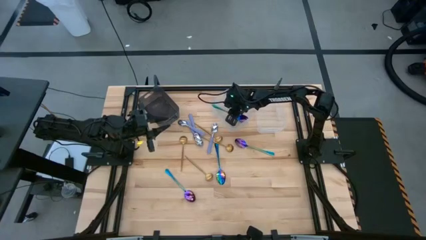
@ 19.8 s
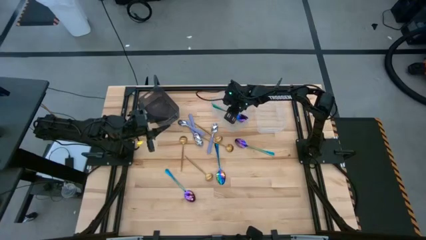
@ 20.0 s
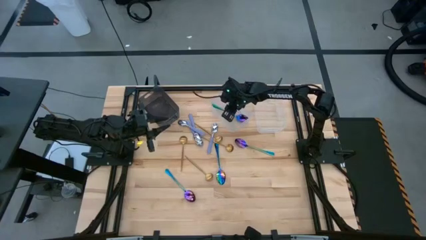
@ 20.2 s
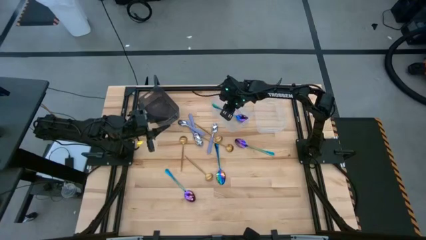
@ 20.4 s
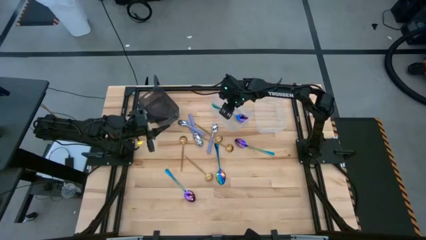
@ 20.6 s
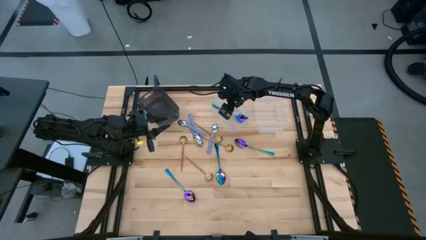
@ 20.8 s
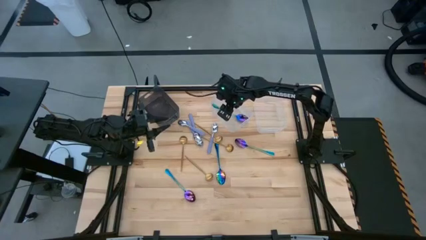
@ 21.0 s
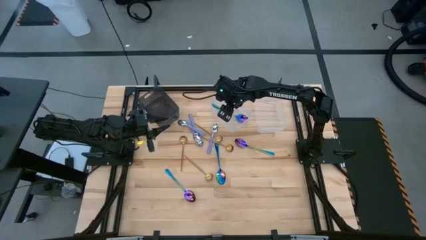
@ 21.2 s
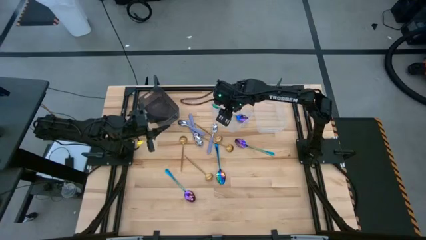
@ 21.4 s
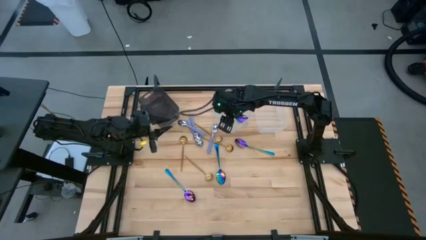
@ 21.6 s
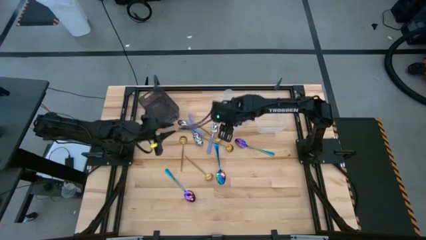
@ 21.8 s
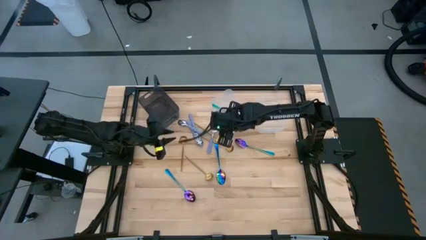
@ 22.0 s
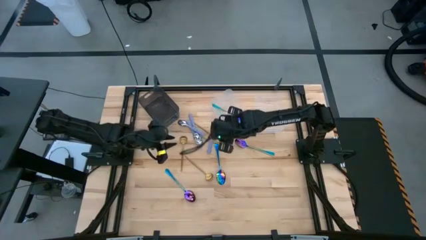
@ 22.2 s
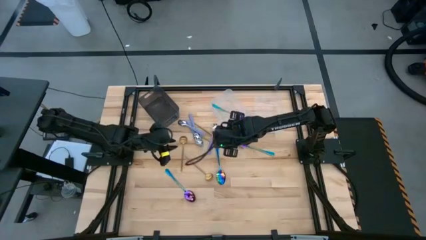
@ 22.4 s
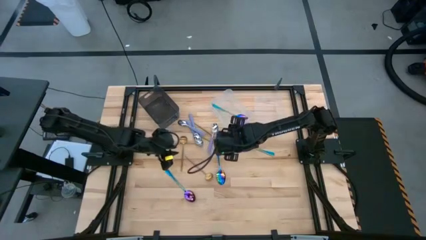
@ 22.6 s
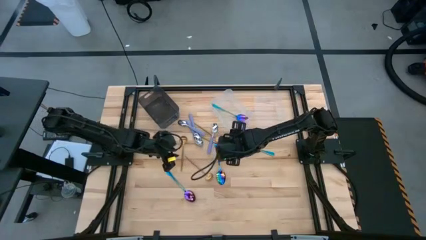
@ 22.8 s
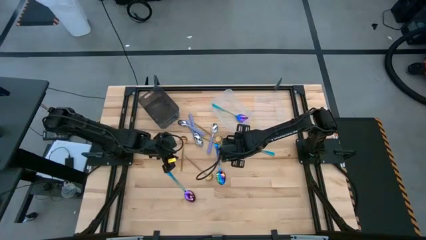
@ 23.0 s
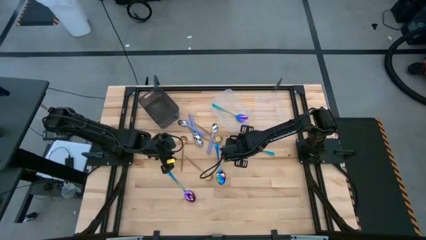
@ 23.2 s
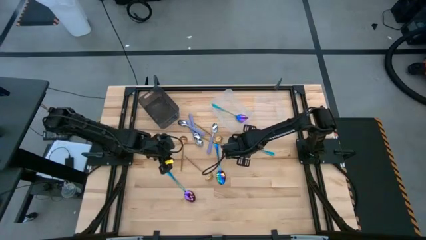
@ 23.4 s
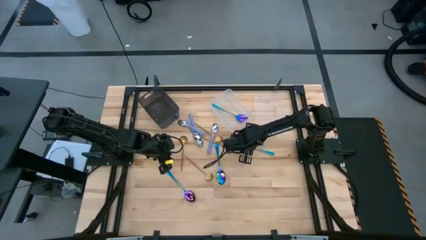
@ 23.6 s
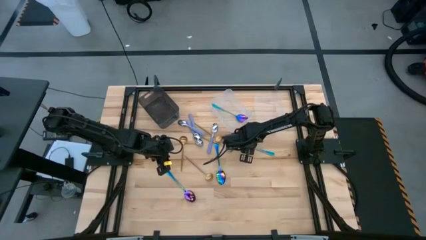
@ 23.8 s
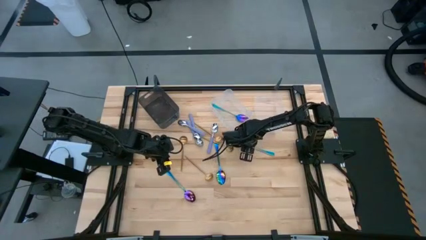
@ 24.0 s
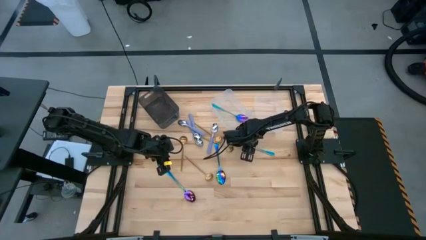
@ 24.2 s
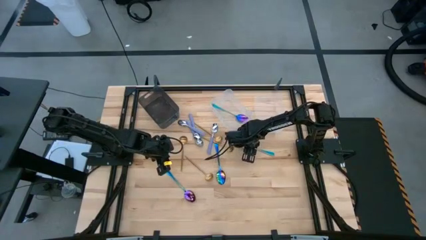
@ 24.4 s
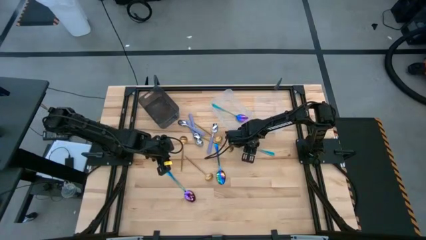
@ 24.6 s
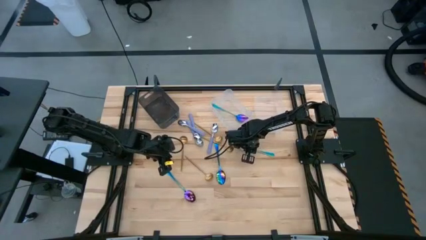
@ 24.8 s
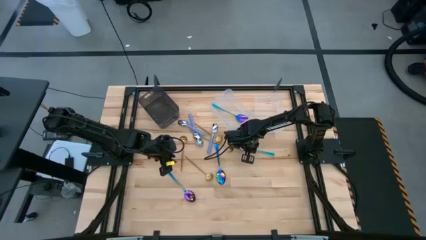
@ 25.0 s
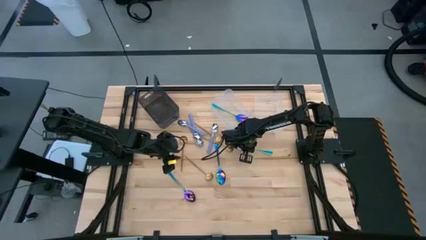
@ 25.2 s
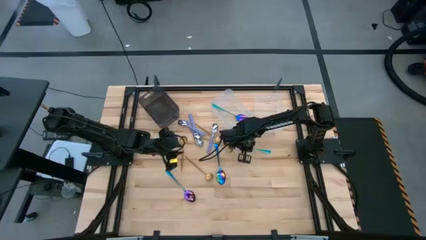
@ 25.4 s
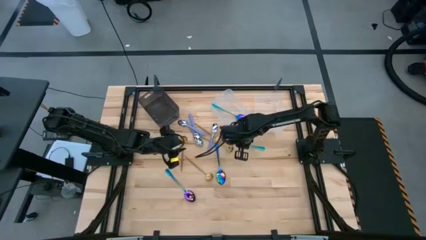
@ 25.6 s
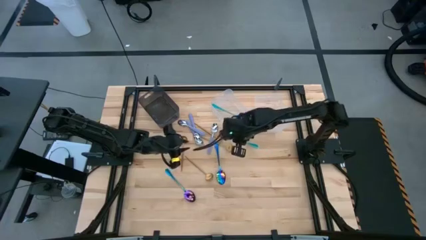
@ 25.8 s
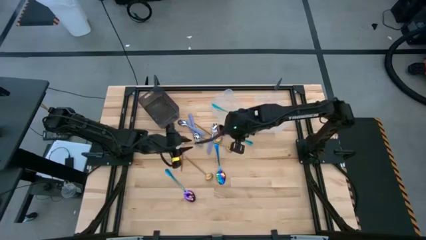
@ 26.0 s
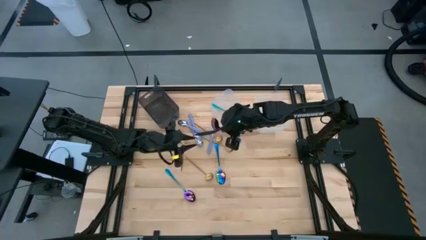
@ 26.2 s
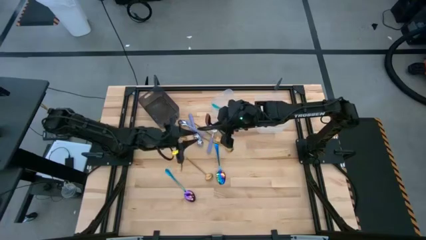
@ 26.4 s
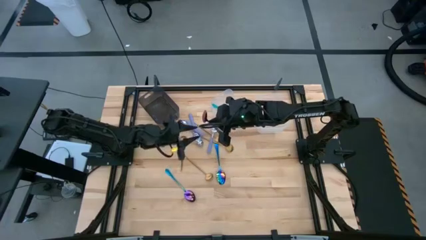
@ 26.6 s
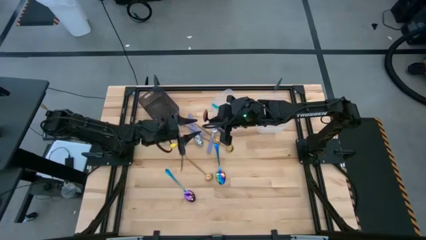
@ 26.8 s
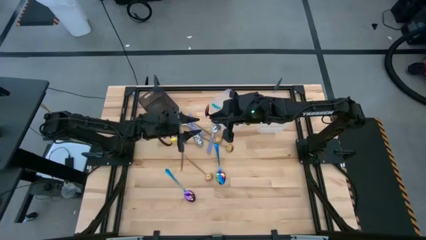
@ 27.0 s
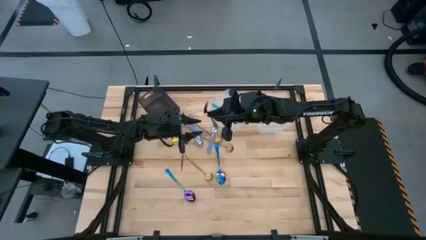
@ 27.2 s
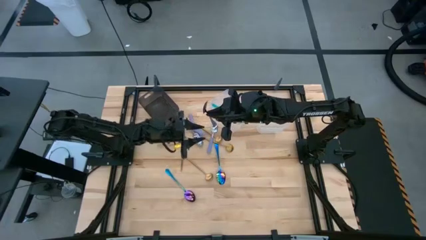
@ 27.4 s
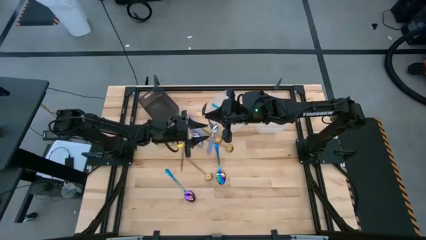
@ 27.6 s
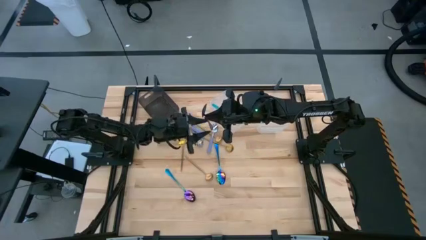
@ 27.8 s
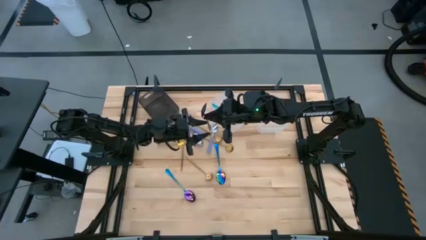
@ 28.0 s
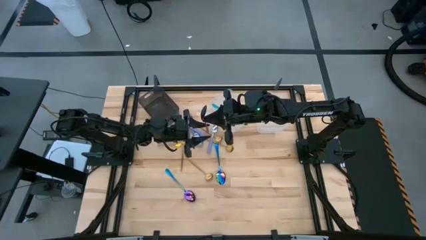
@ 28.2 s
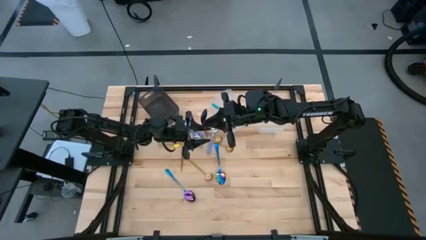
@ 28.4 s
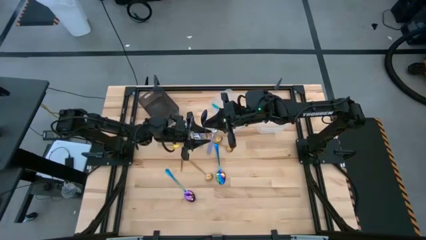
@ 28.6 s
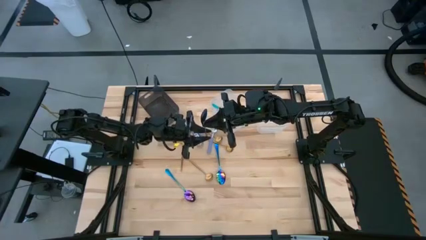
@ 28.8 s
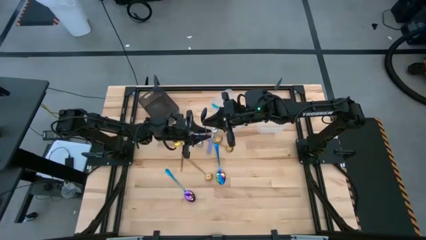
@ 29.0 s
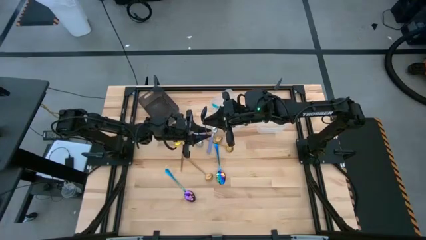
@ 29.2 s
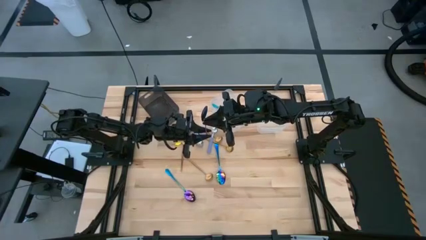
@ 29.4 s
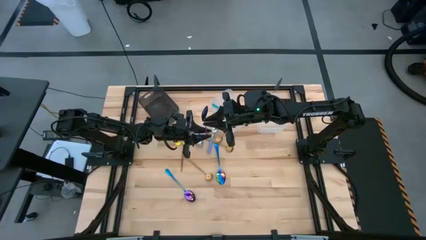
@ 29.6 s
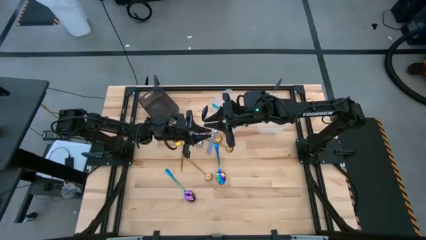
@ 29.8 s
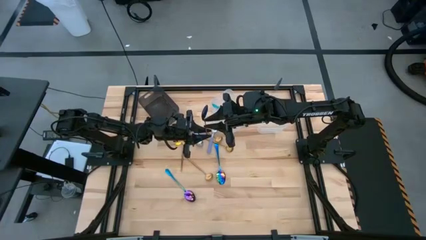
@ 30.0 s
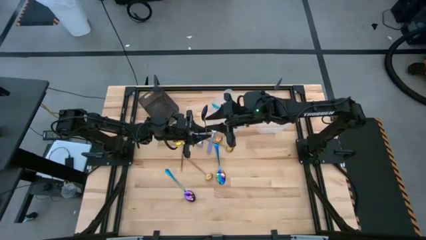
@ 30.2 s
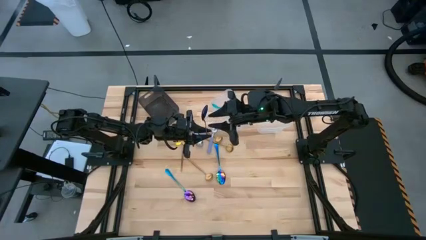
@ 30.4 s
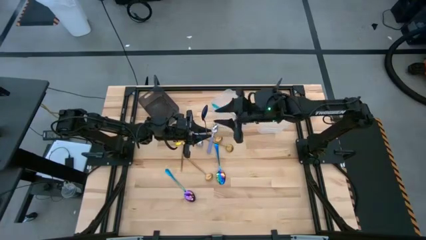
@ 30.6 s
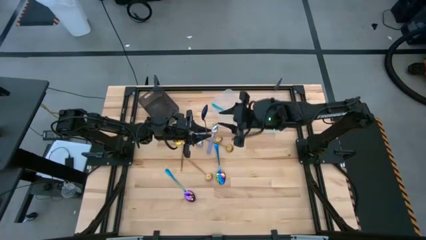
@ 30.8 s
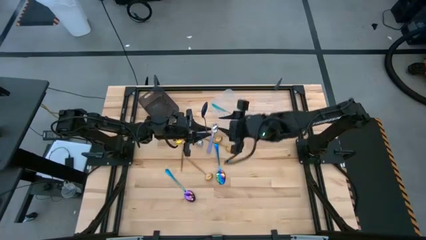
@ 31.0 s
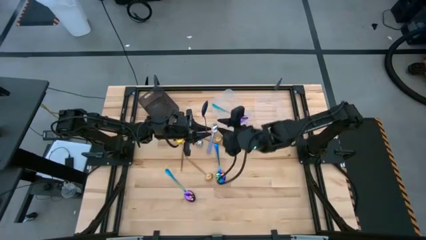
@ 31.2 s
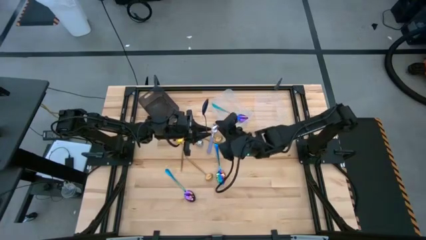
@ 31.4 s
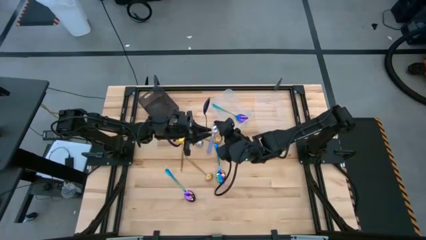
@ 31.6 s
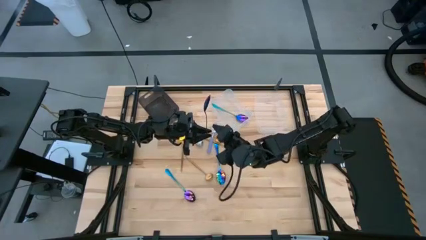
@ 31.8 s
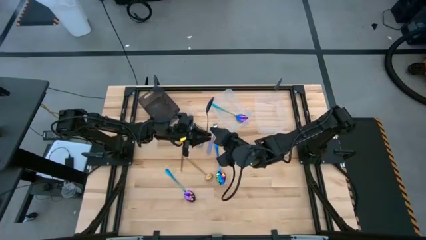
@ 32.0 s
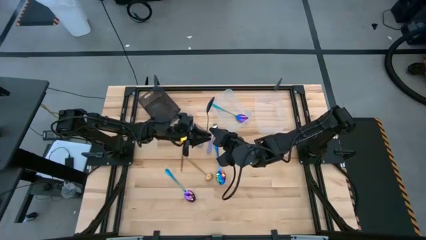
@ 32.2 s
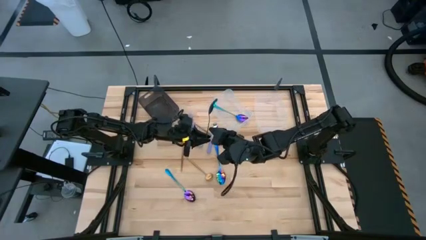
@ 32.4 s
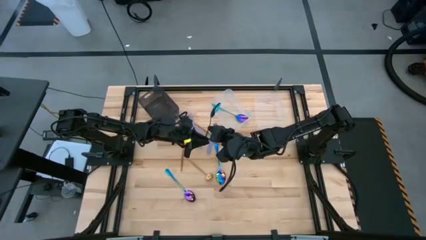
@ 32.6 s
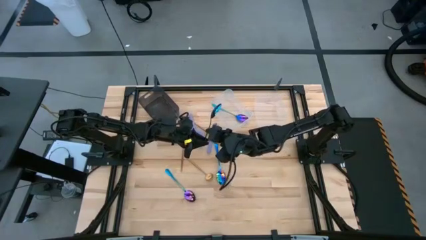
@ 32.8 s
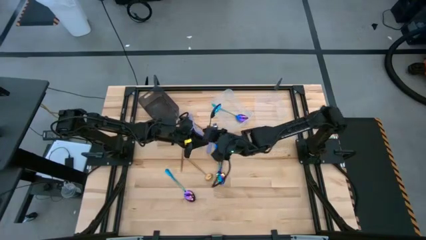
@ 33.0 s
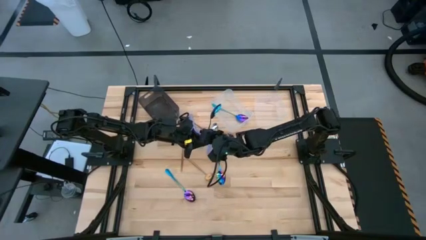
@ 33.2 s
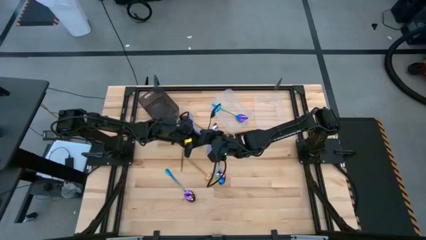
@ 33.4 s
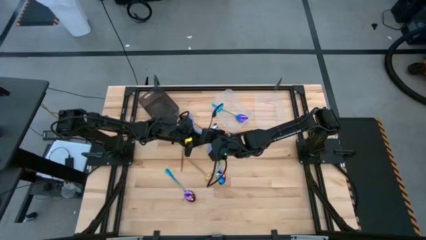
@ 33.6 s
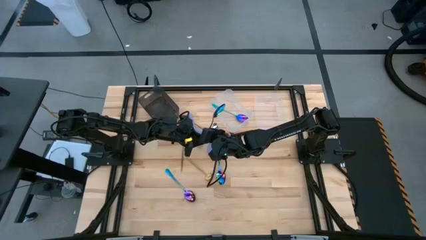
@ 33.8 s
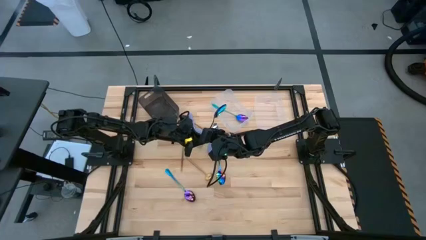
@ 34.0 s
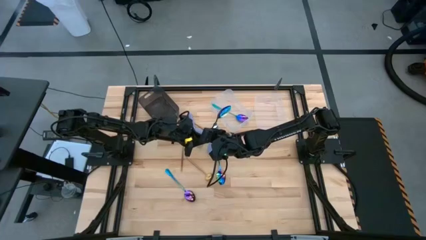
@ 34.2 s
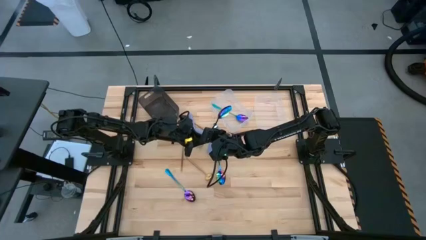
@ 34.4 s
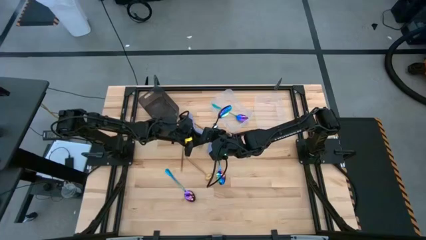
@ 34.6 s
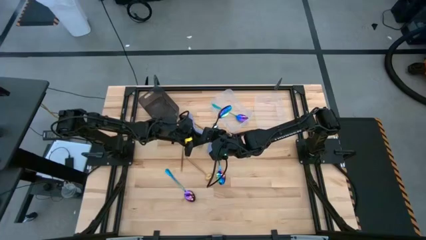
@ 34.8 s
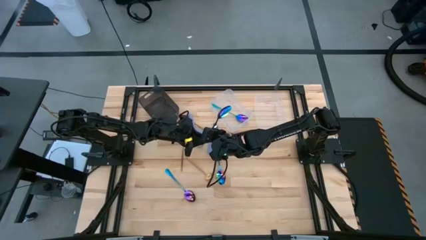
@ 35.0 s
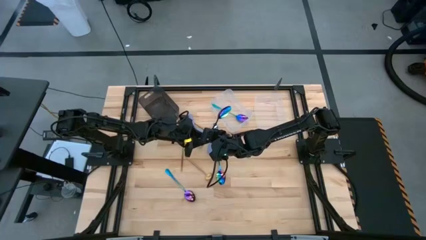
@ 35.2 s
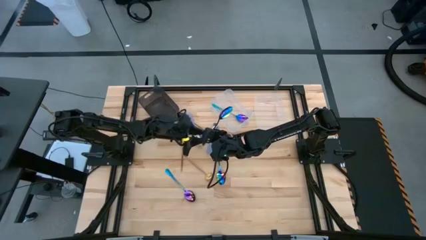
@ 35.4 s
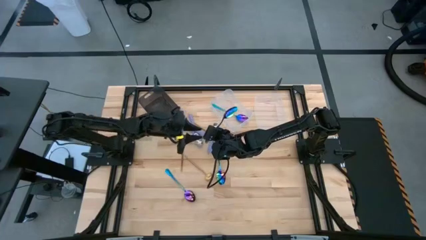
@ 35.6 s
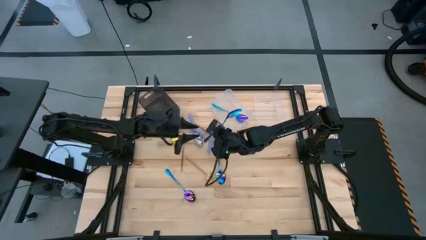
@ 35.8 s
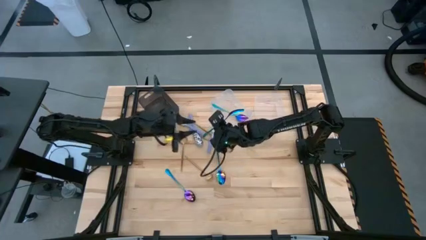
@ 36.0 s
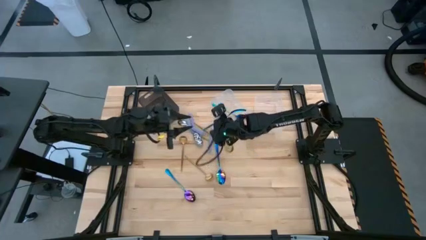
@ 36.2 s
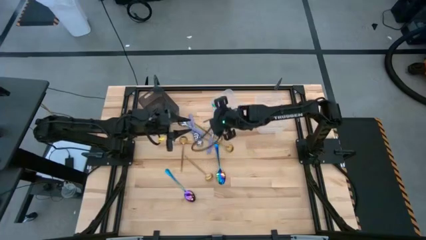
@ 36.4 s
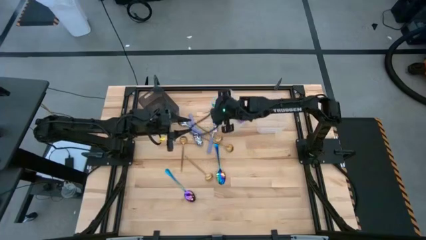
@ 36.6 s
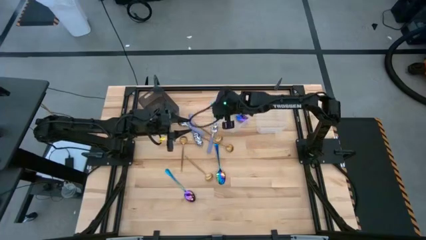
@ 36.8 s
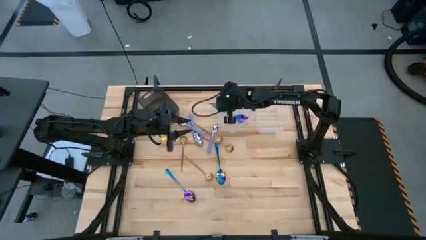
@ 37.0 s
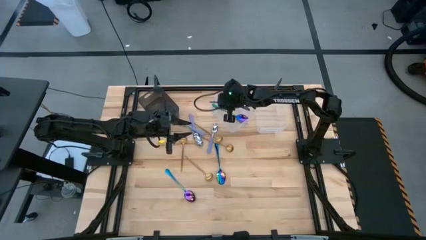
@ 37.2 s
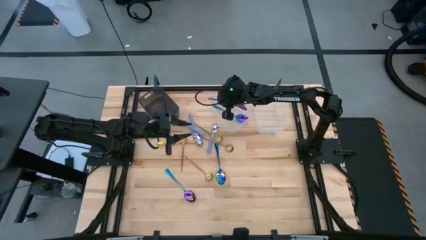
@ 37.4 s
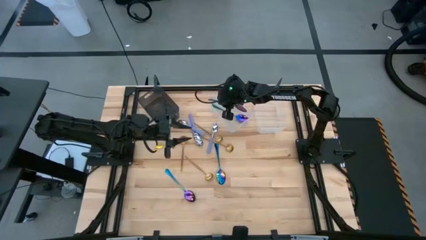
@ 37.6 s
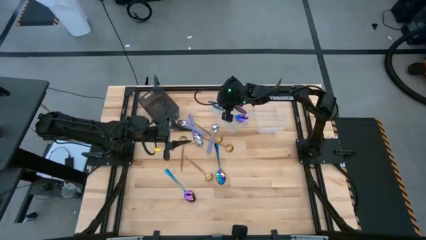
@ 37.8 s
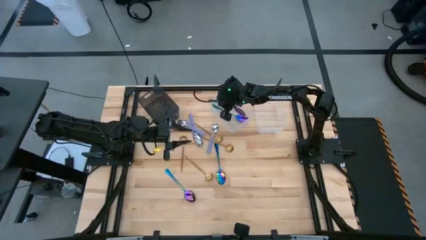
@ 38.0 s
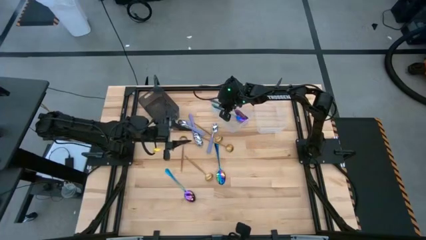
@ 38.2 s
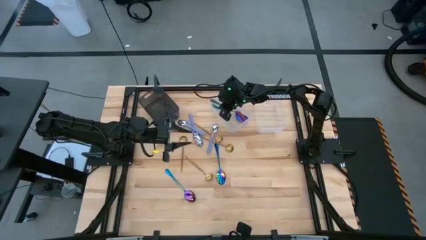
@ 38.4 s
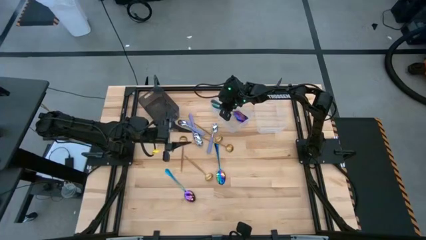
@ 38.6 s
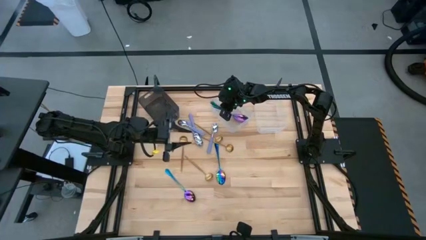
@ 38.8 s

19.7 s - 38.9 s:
Task: Sort silverware by color (type)
Put the blue spoon into the left transparent bin
